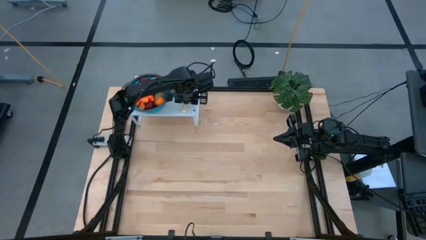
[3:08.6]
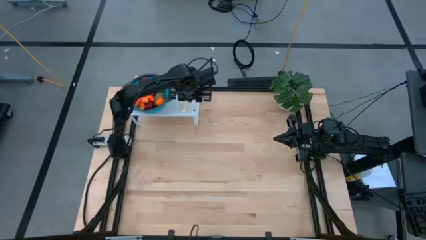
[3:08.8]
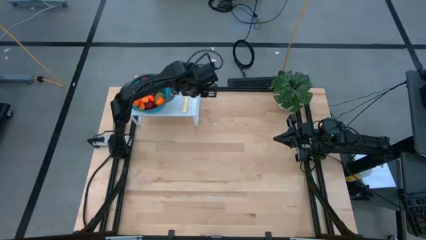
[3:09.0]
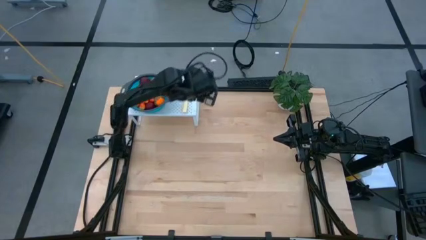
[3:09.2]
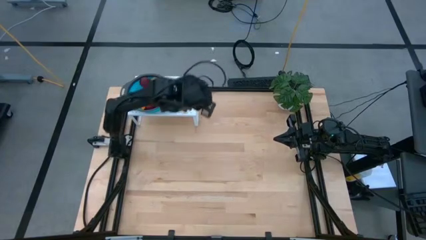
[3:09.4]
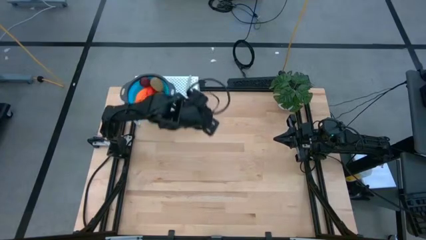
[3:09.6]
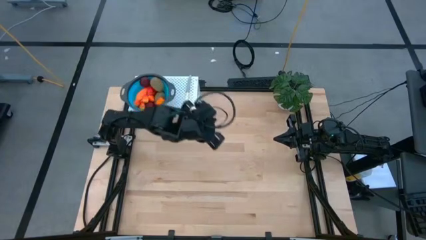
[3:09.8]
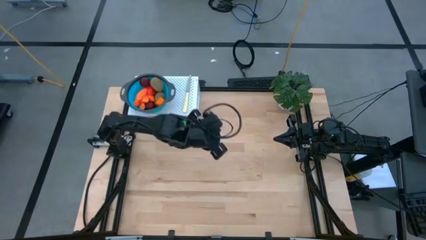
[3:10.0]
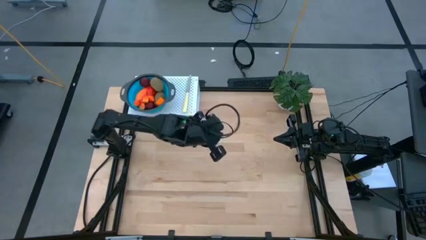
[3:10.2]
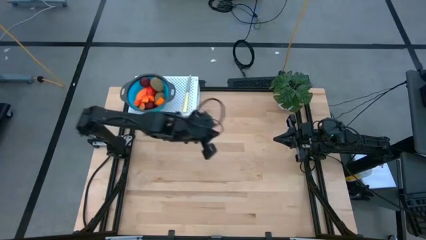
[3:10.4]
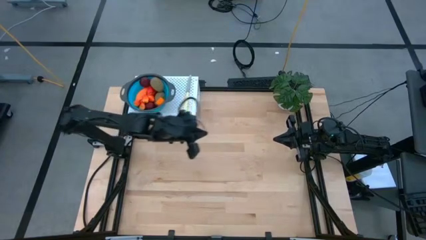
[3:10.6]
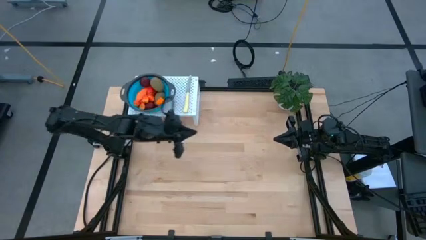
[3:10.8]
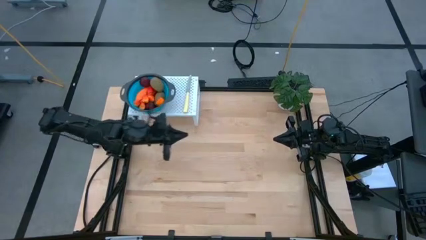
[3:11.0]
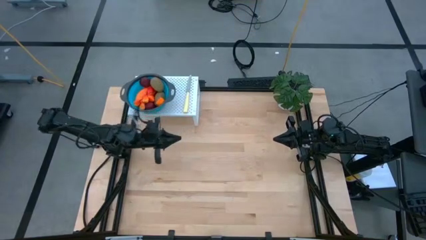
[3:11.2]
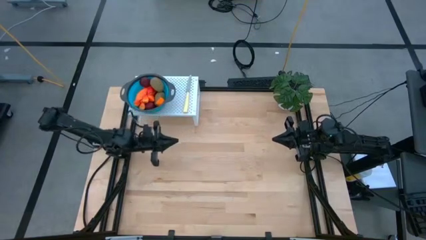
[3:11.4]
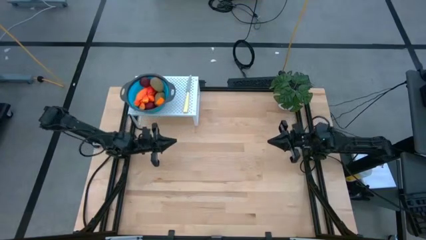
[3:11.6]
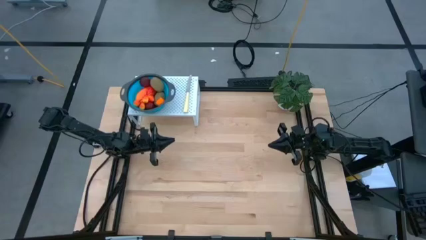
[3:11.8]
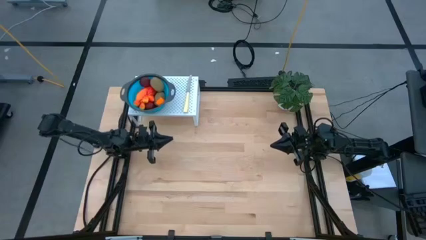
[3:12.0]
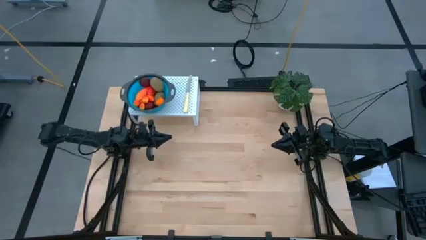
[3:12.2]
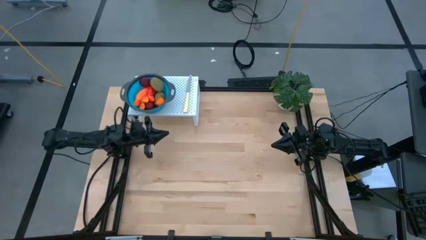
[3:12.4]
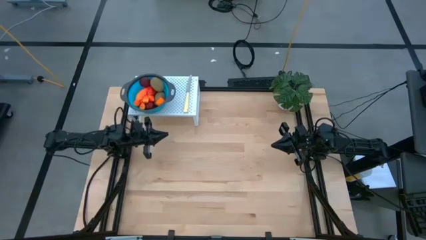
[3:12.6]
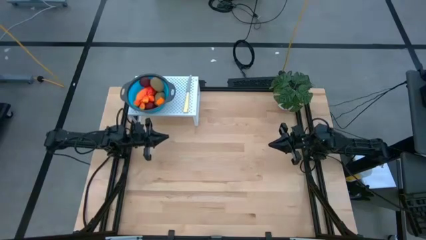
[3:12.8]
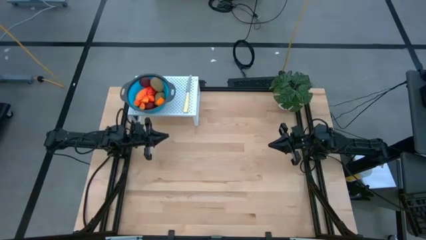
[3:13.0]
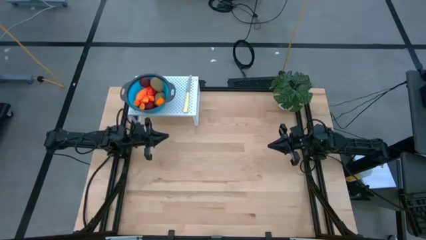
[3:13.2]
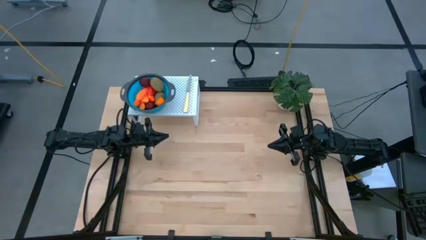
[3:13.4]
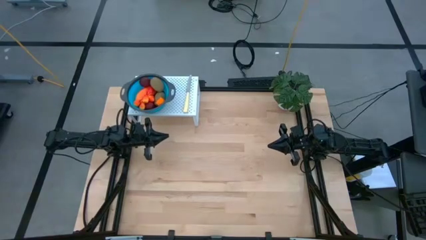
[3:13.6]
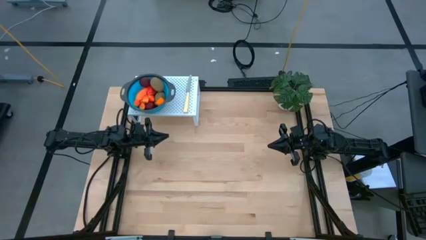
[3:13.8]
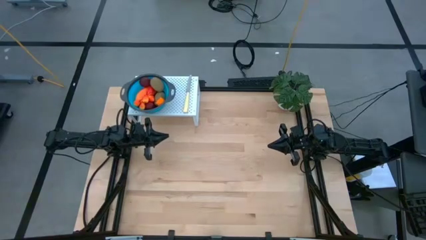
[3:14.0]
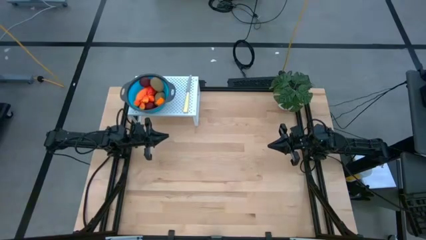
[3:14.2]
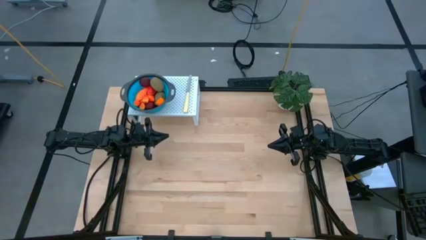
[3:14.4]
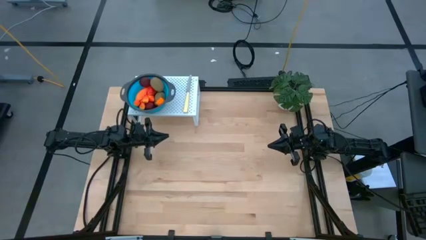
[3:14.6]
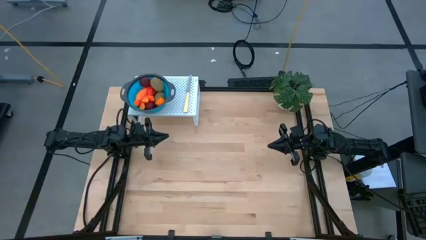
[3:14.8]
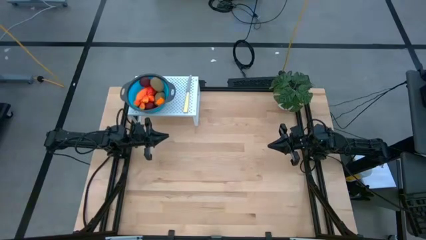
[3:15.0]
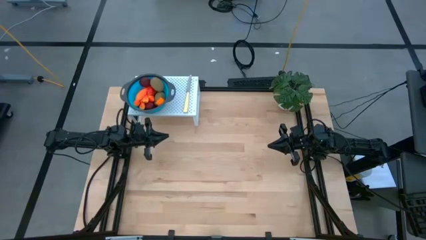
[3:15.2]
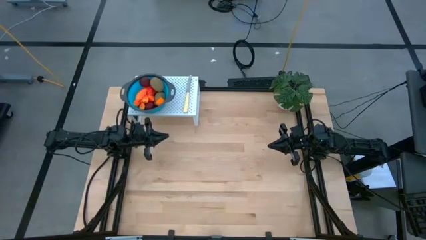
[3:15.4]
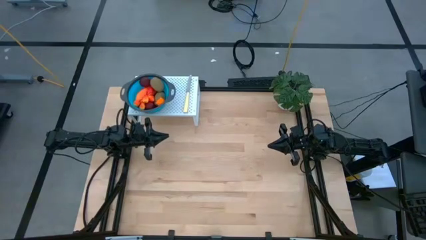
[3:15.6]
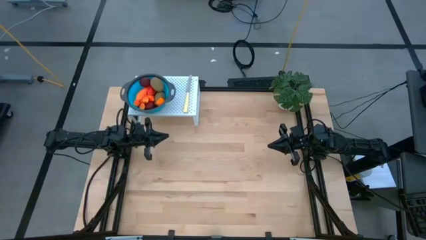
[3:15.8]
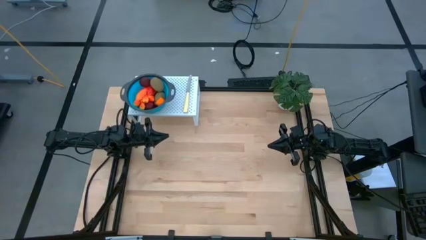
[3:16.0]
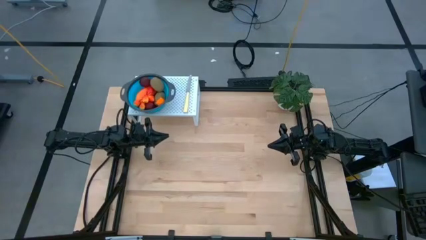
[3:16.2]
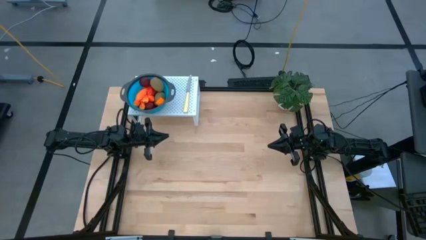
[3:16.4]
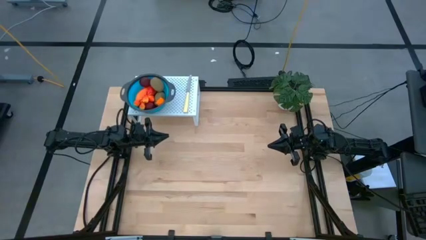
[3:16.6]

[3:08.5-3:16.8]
Task: Pick & Place Fruit
Return to Home Position
